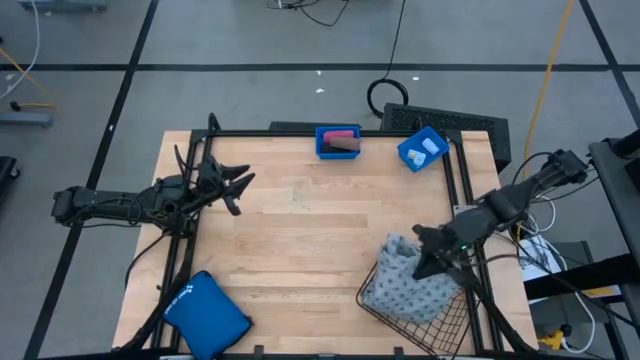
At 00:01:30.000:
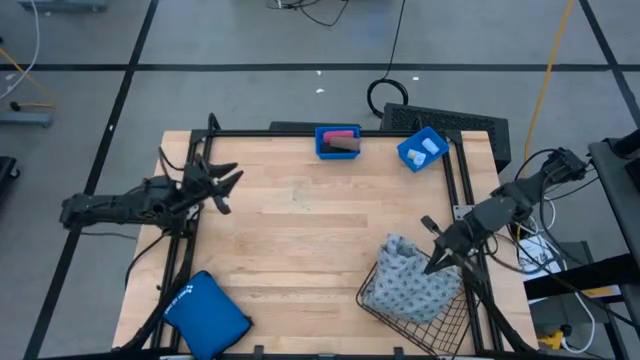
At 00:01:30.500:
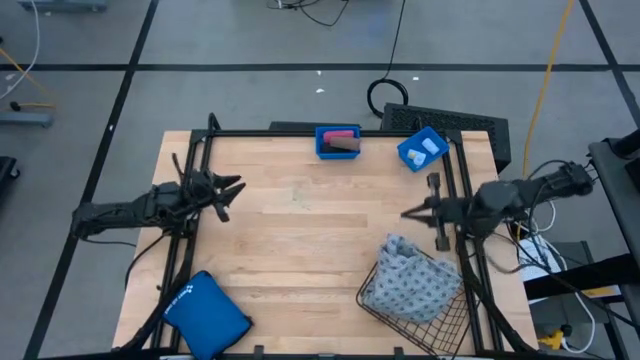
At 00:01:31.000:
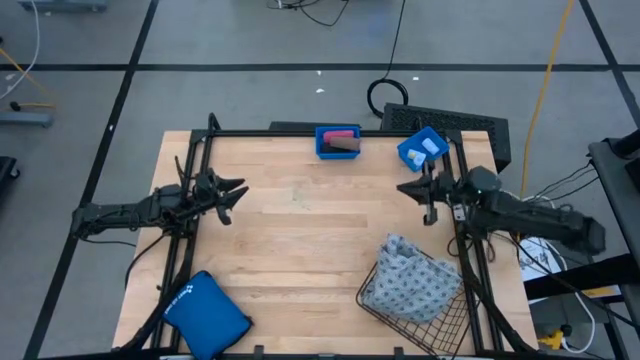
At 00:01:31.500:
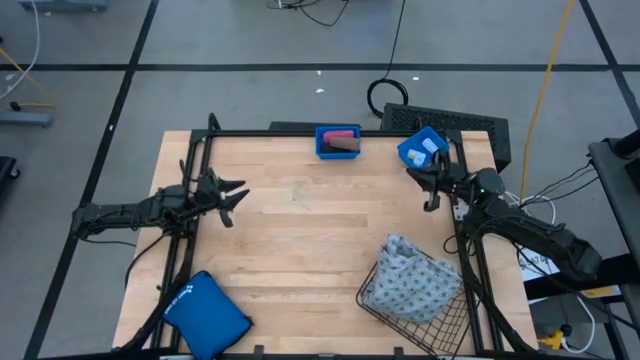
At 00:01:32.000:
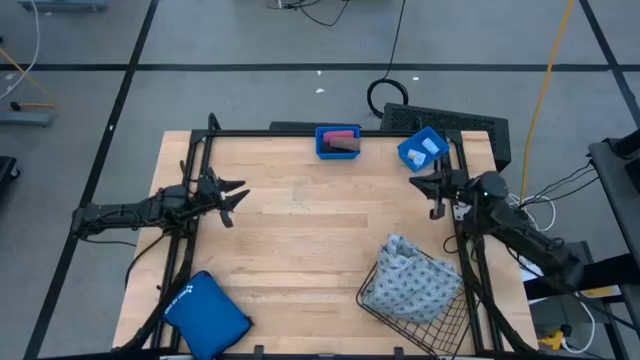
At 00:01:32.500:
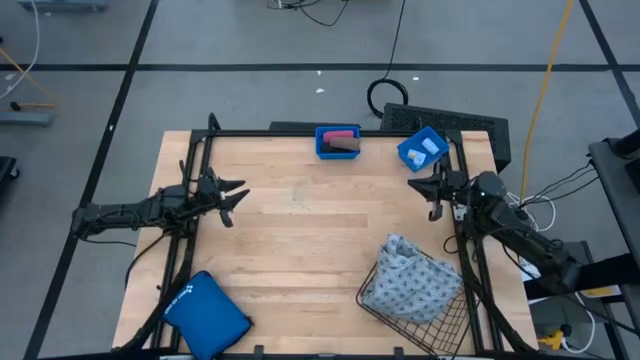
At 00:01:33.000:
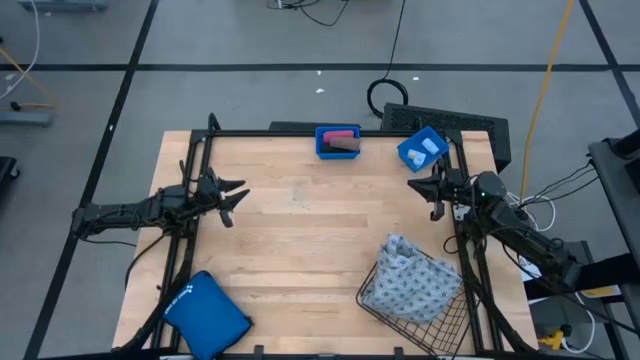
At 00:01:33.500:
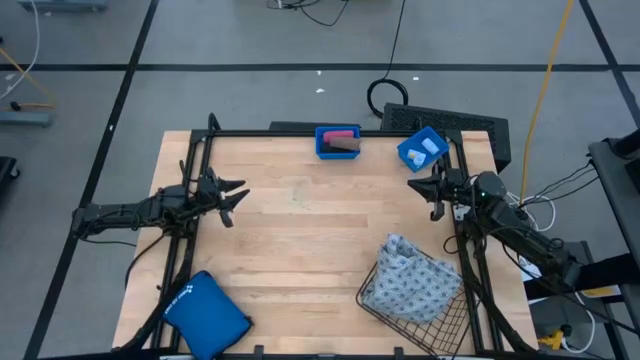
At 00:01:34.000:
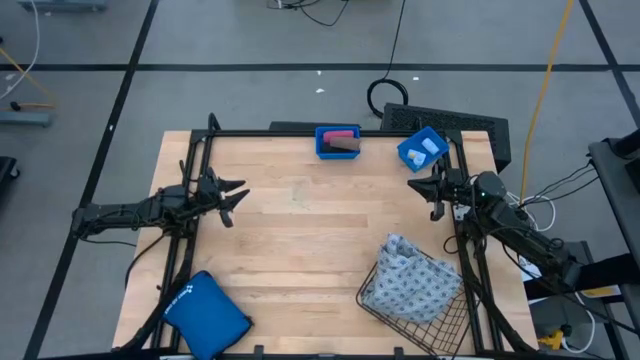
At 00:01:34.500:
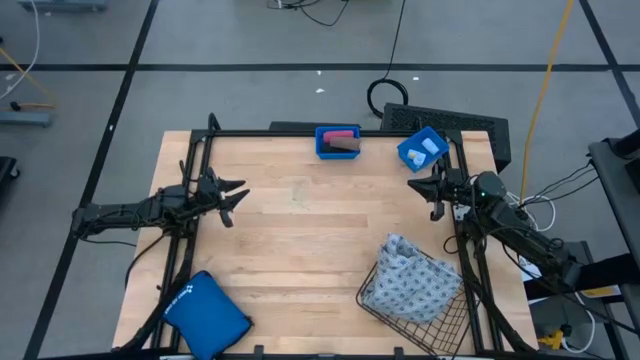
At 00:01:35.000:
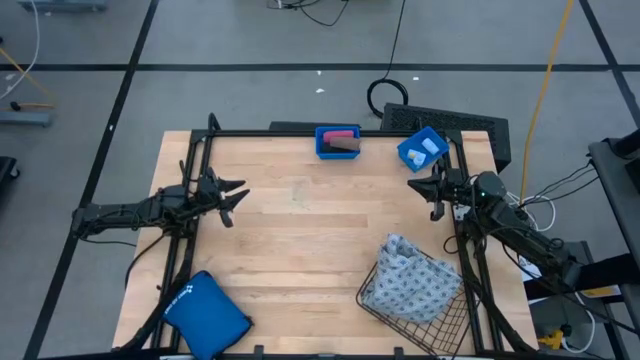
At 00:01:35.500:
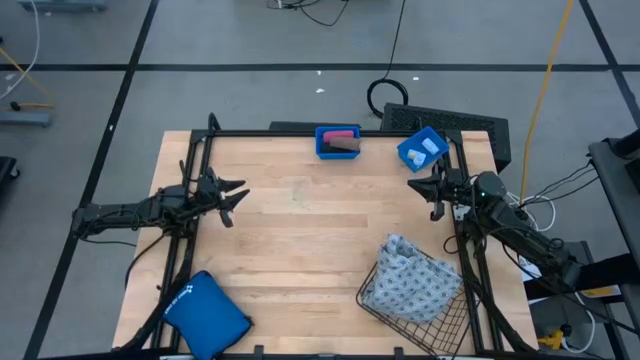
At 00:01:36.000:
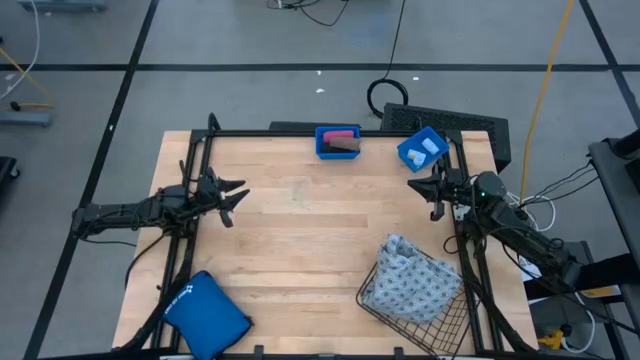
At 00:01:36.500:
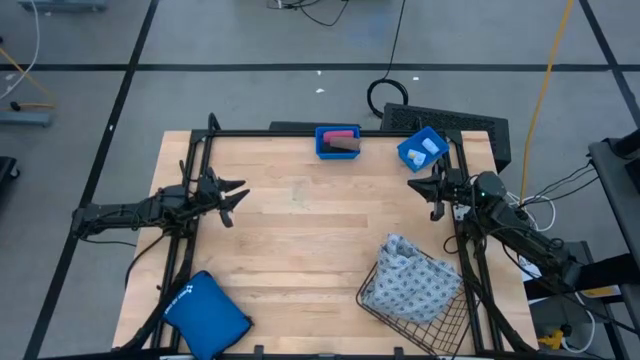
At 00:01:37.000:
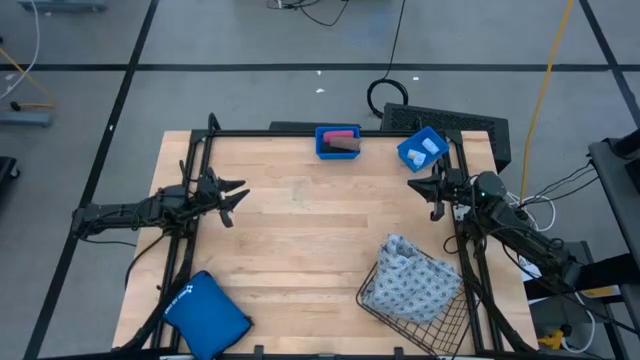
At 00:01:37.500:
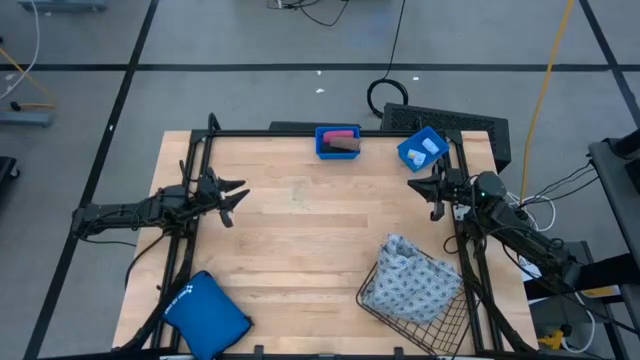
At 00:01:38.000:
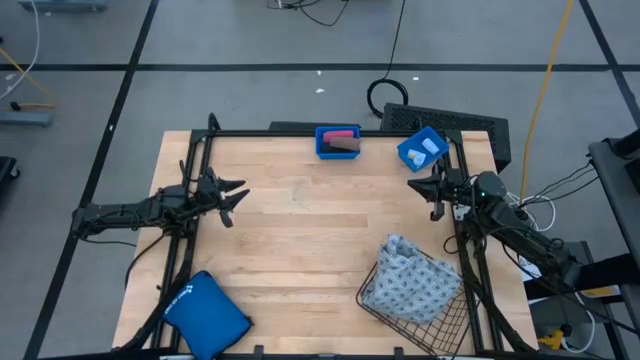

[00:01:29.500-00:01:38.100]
Task: Pick & Place Medicine items
Return to Home Position

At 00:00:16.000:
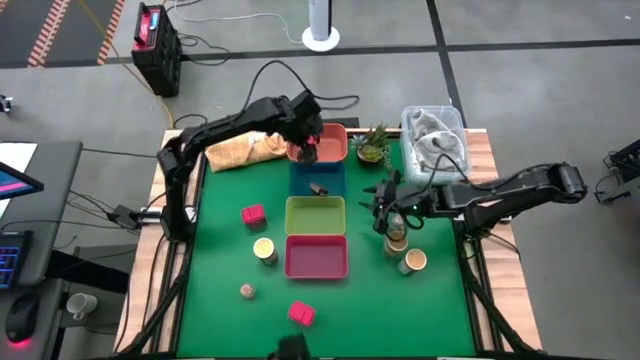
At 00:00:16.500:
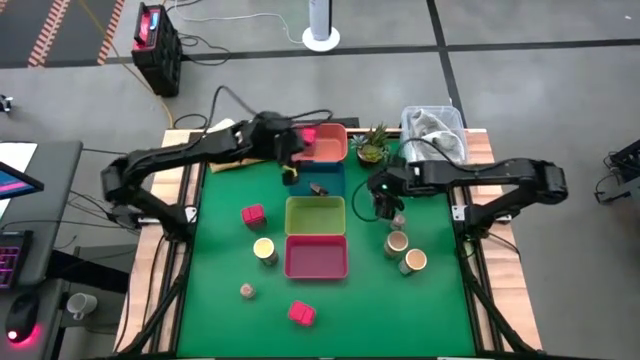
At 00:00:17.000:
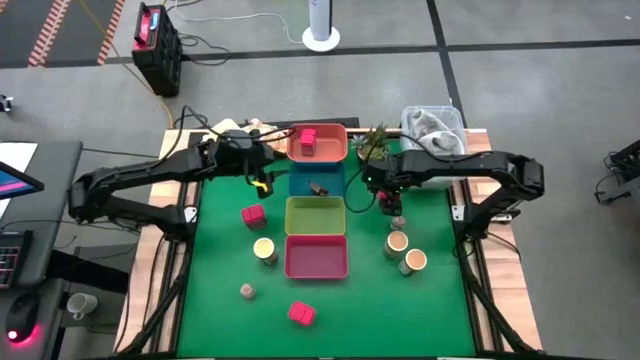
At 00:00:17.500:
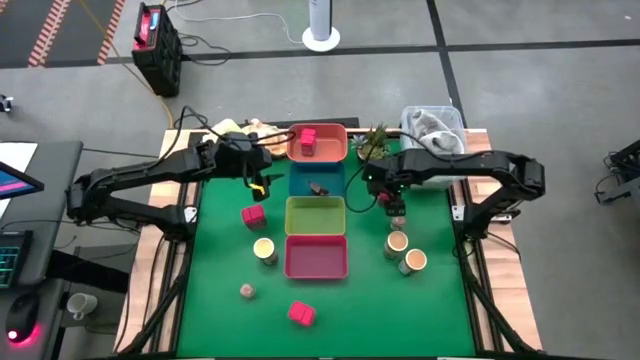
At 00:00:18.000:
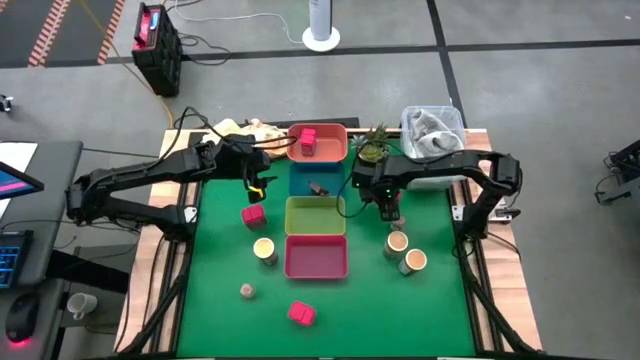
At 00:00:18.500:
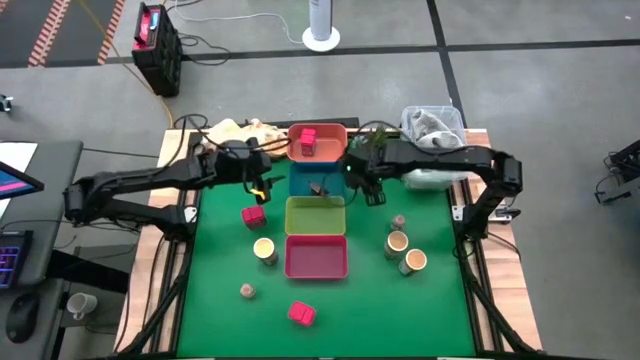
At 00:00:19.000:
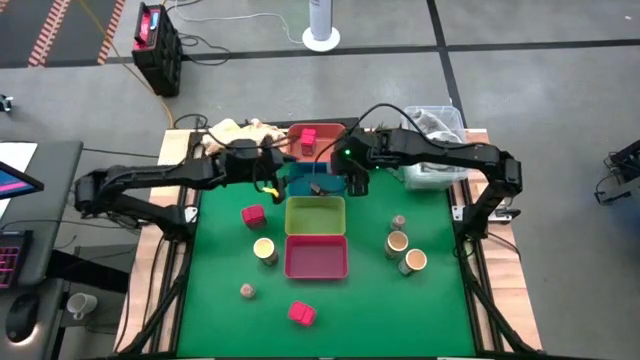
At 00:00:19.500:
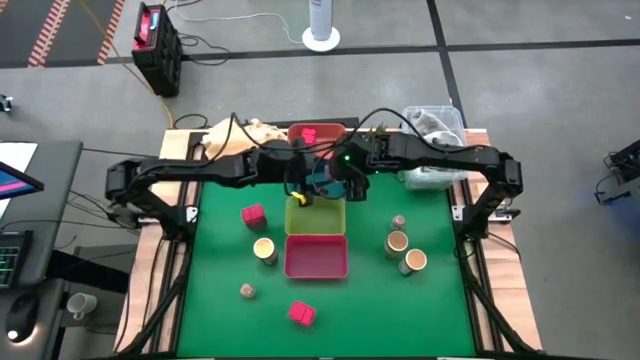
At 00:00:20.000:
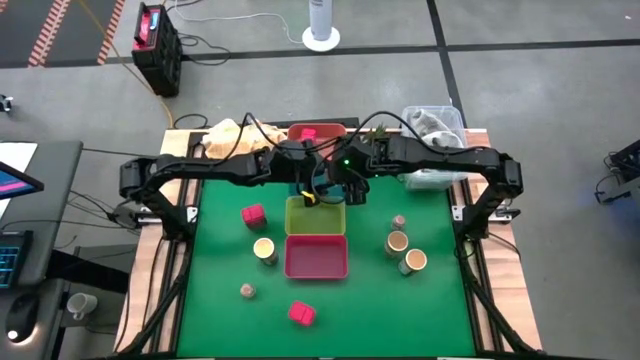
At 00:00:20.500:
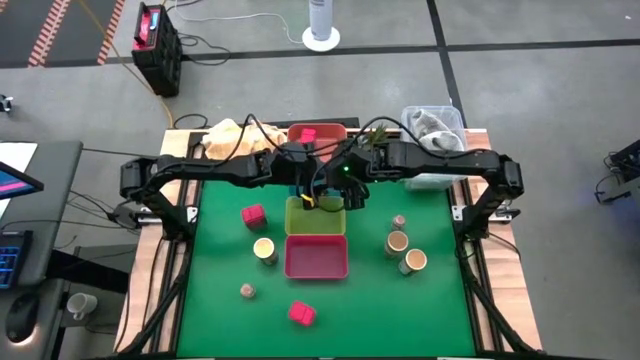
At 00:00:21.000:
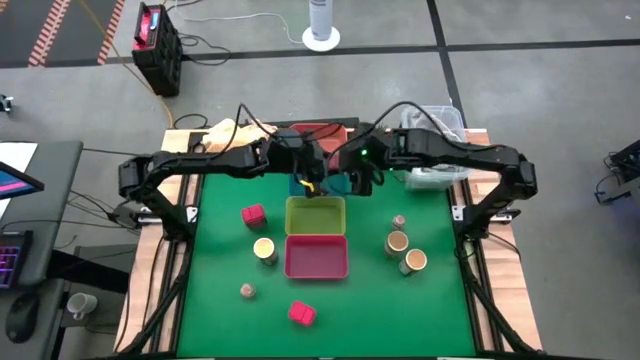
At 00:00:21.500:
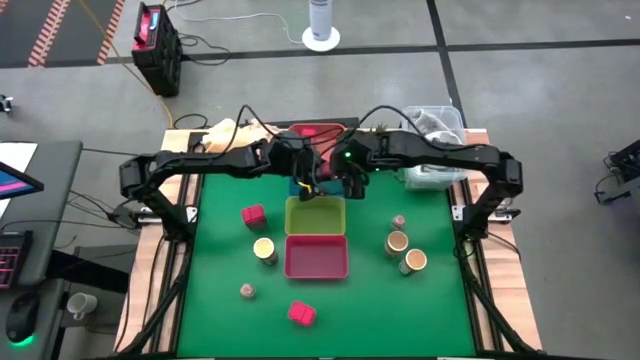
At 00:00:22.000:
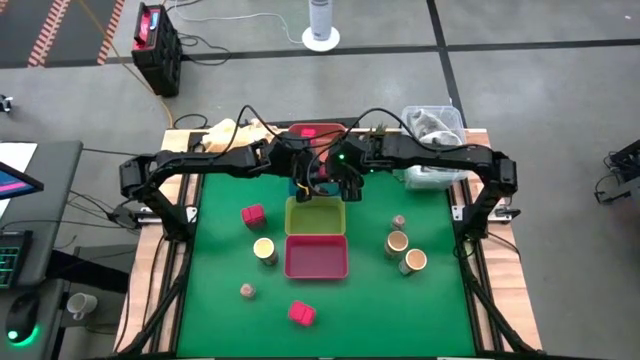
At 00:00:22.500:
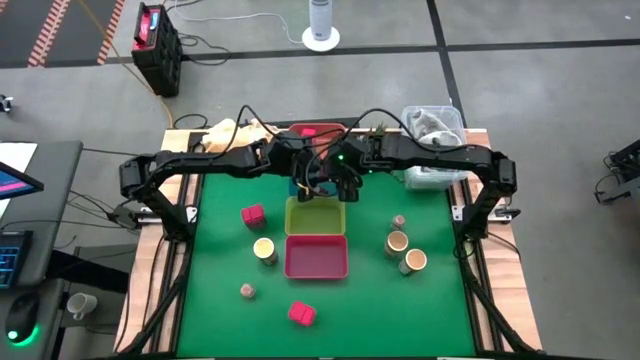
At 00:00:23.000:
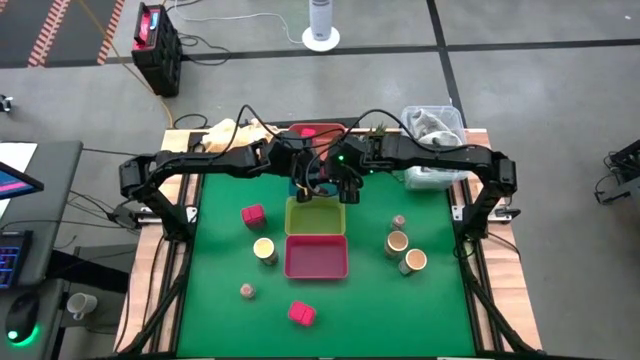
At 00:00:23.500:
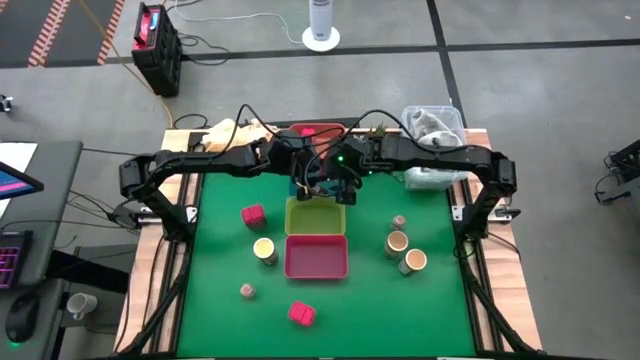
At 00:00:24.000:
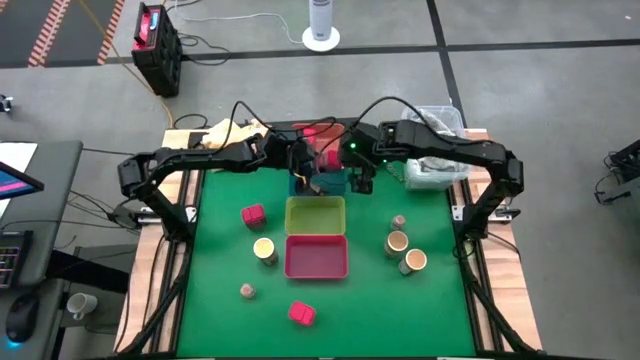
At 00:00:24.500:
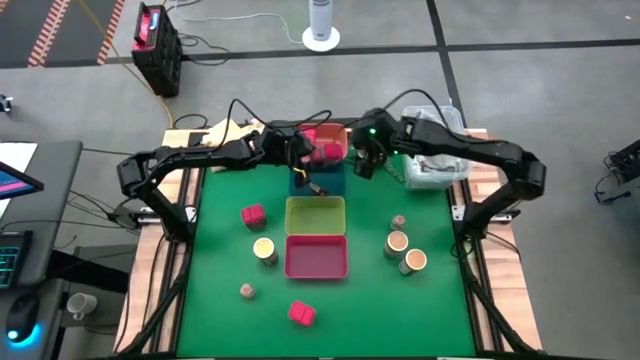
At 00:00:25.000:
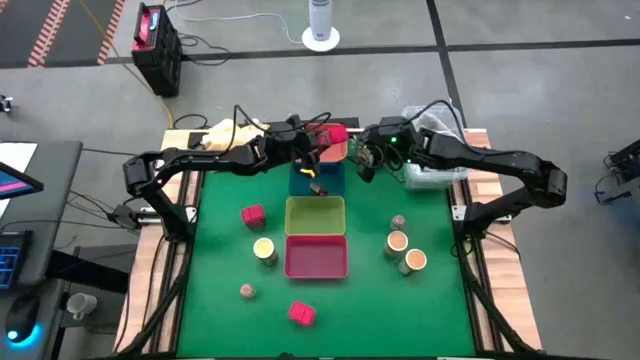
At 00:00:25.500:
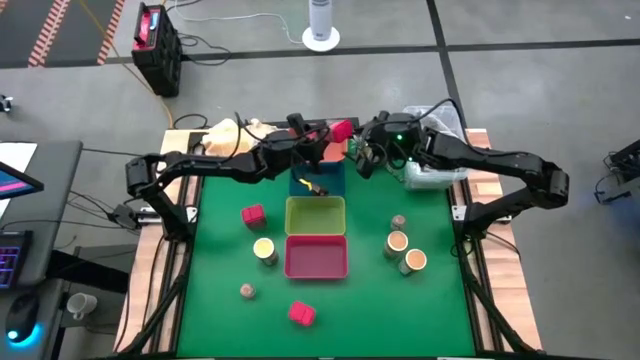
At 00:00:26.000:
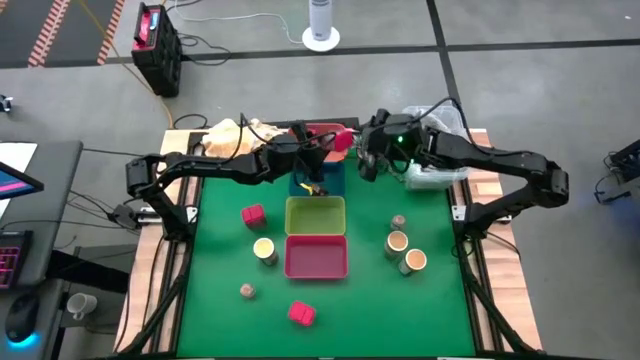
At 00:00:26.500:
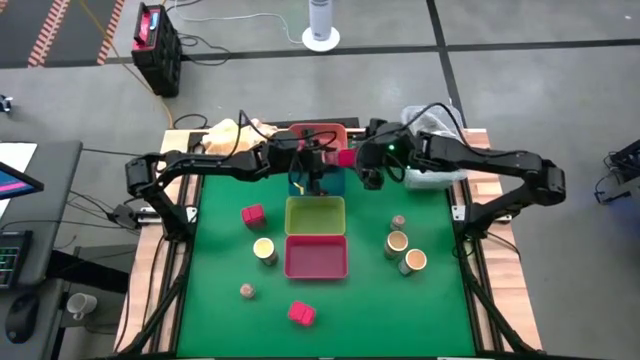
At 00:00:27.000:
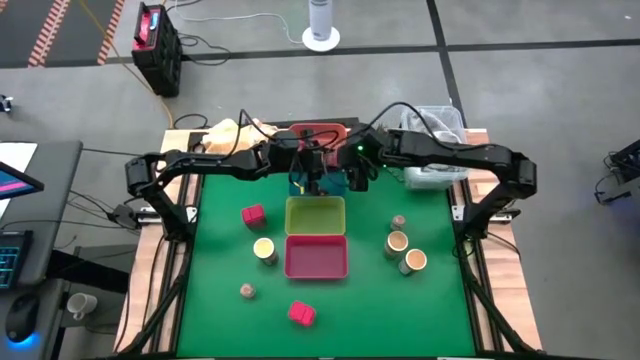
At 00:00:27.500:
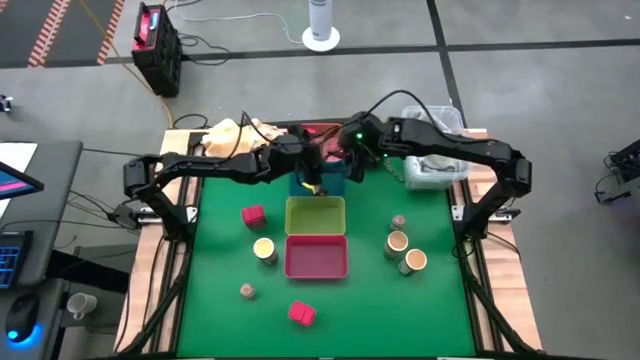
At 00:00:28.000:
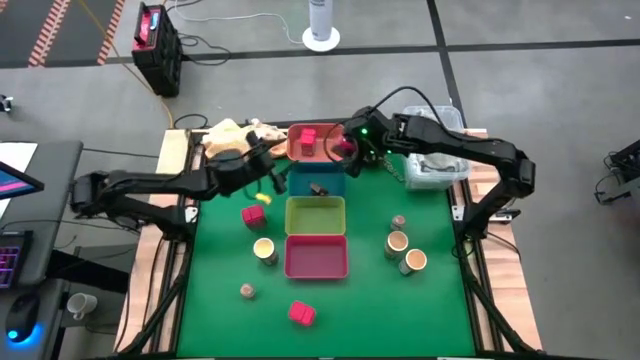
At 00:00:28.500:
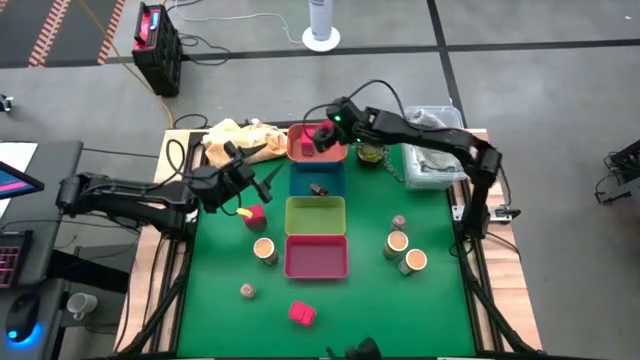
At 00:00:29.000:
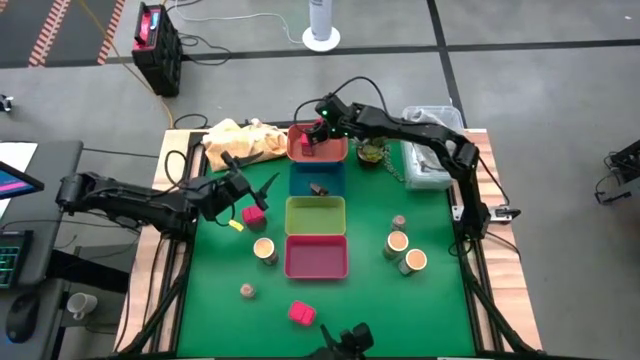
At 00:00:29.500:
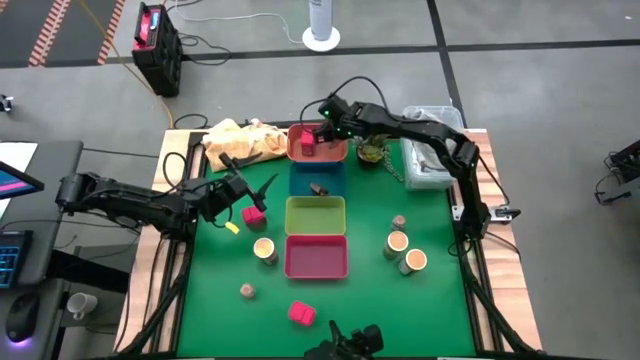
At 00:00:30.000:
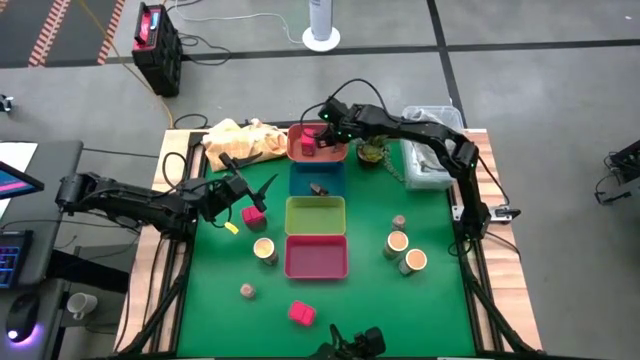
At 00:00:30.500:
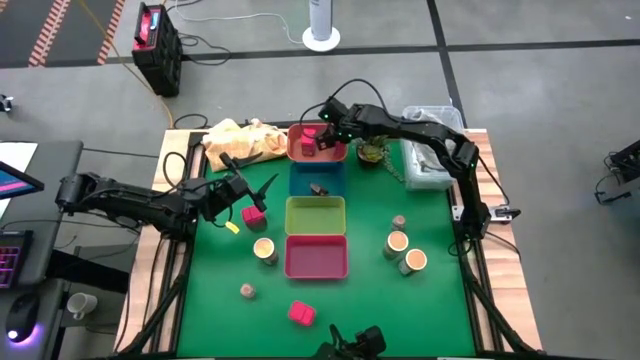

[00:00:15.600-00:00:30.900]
Task: Sort spices by type
Put the top right red seasoning can into the orange bin
